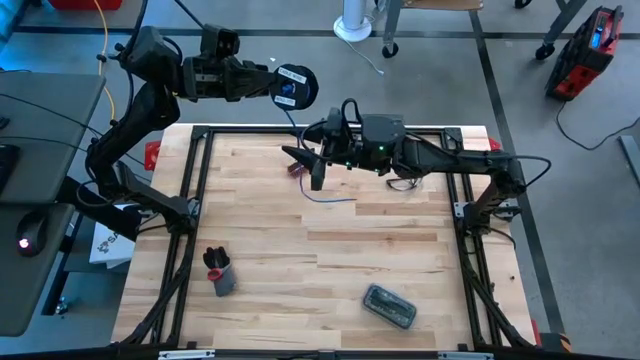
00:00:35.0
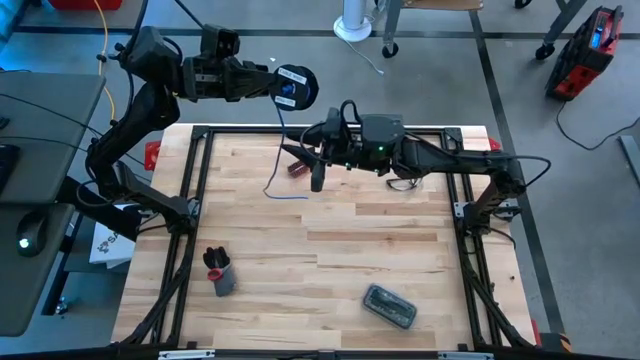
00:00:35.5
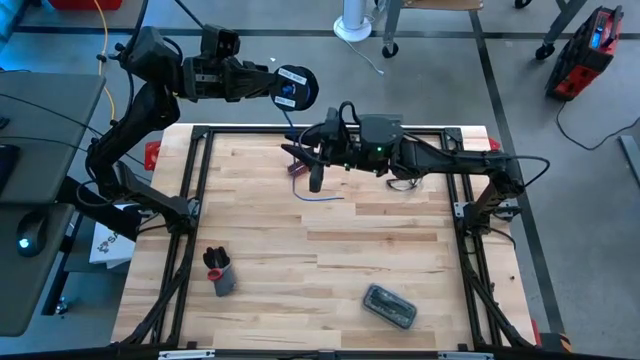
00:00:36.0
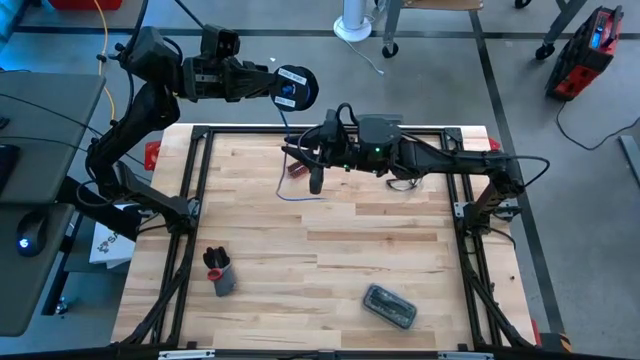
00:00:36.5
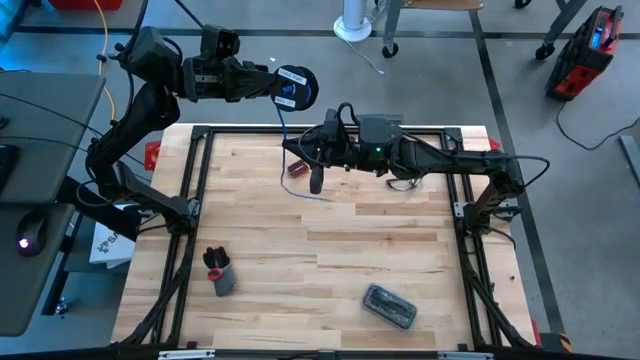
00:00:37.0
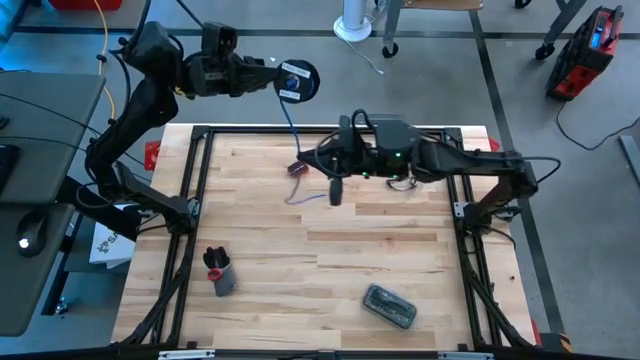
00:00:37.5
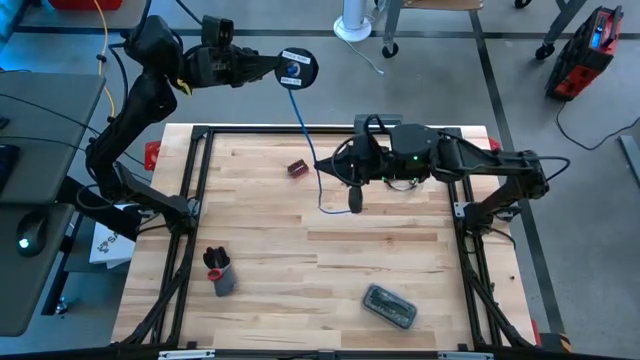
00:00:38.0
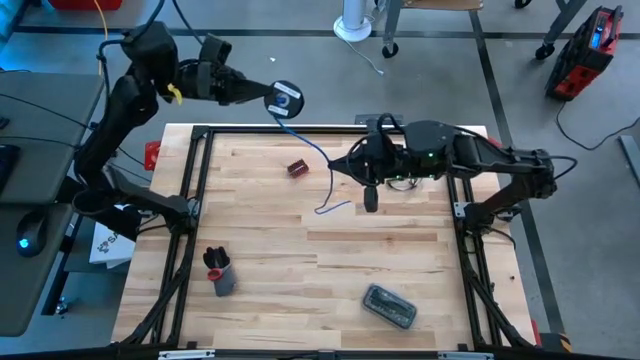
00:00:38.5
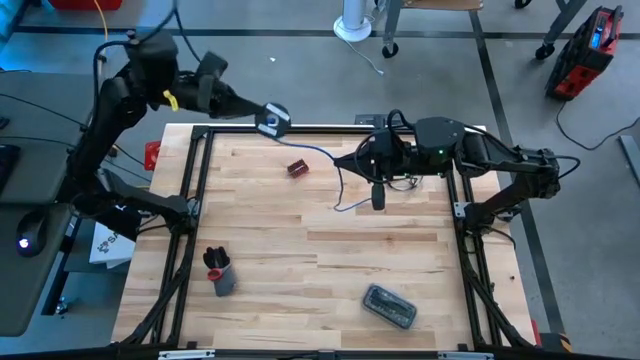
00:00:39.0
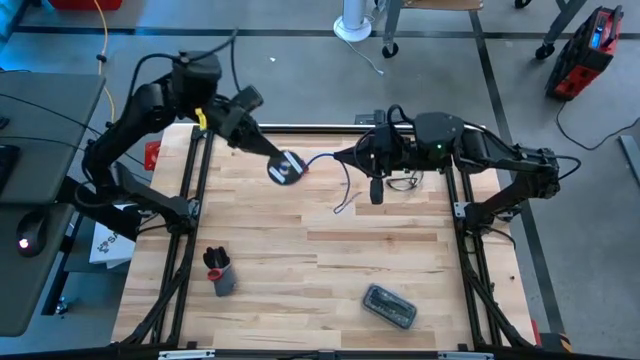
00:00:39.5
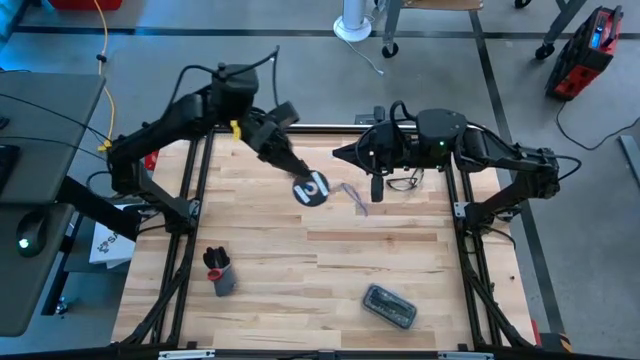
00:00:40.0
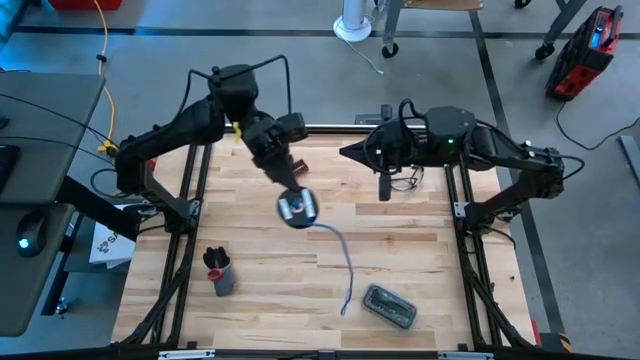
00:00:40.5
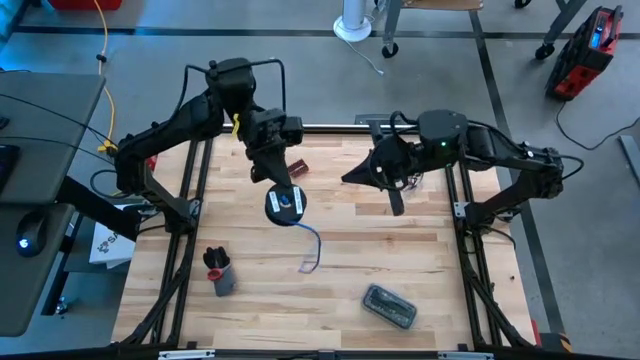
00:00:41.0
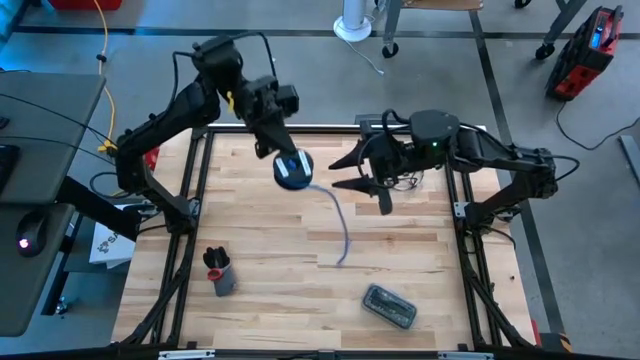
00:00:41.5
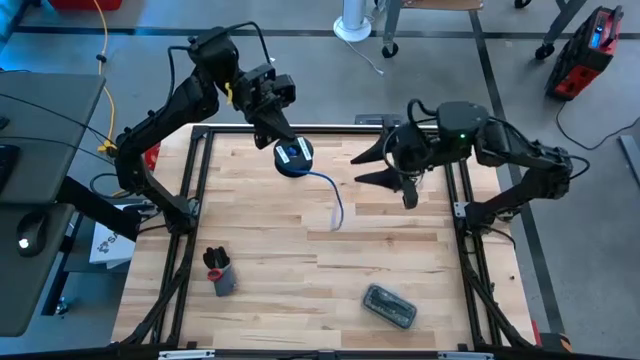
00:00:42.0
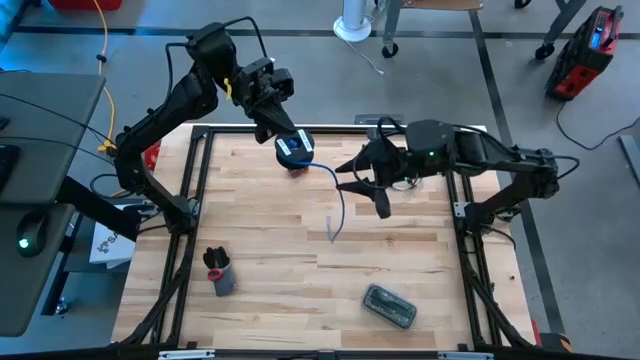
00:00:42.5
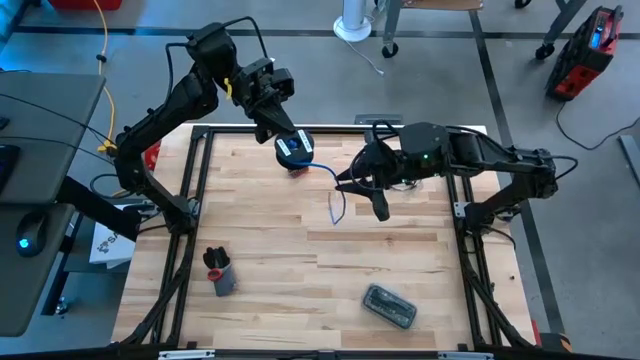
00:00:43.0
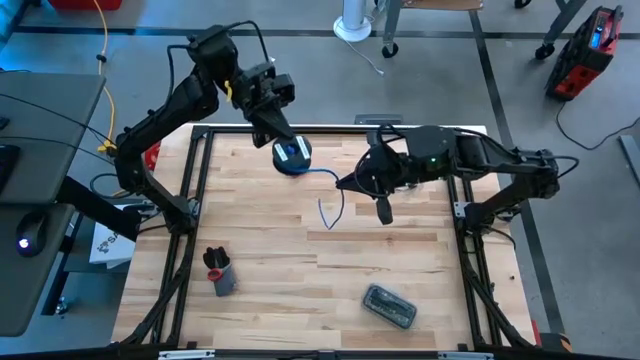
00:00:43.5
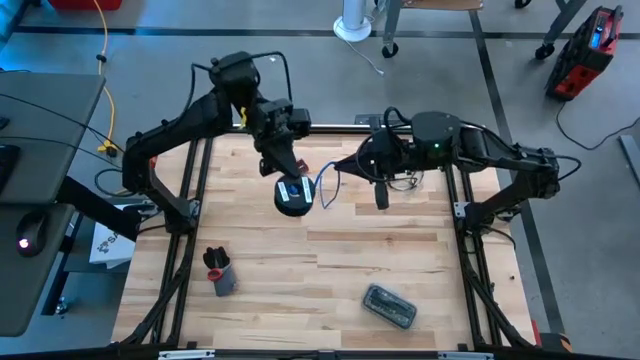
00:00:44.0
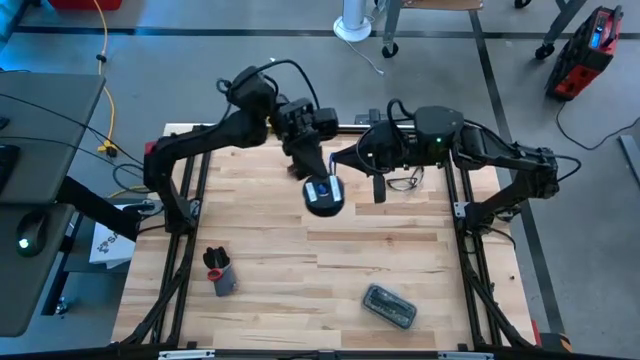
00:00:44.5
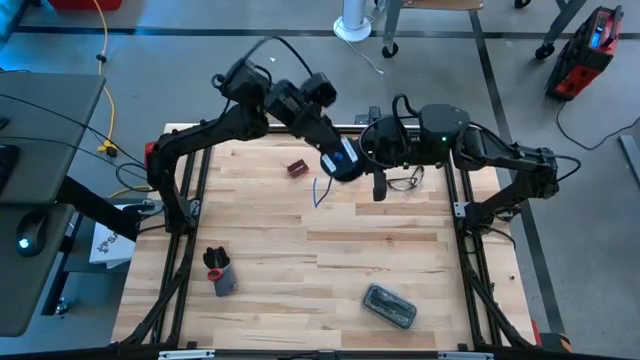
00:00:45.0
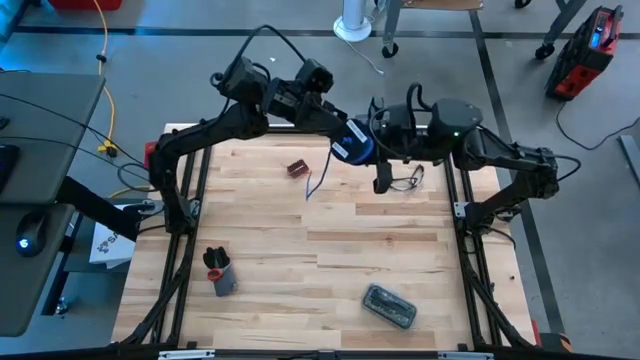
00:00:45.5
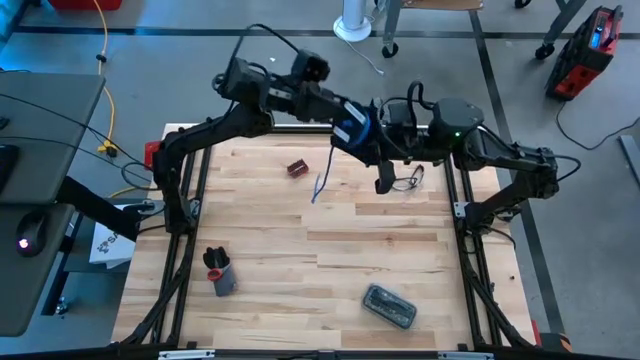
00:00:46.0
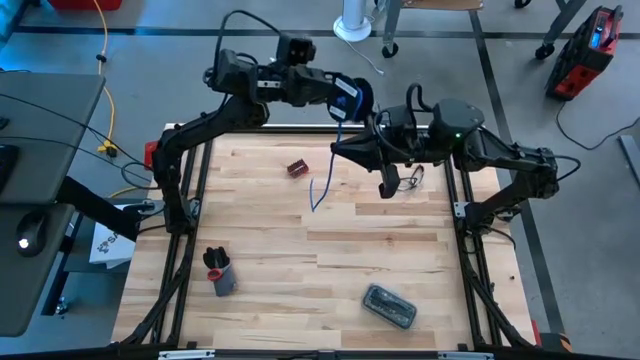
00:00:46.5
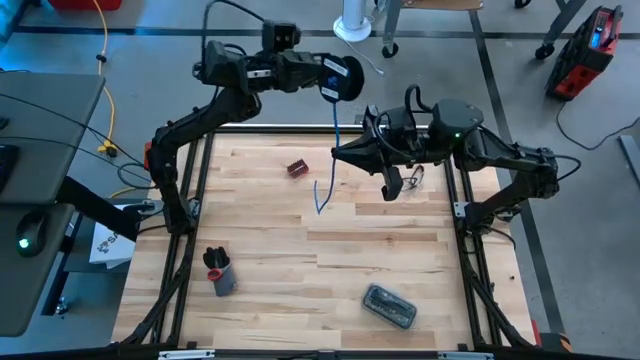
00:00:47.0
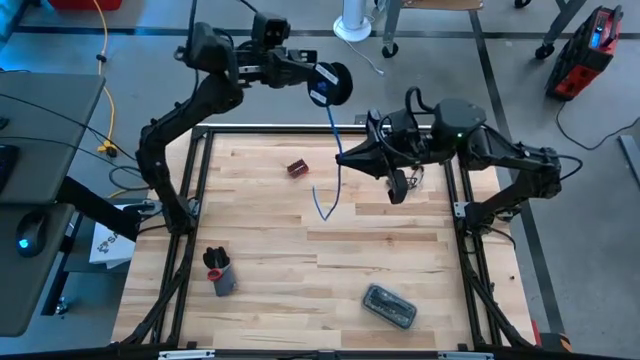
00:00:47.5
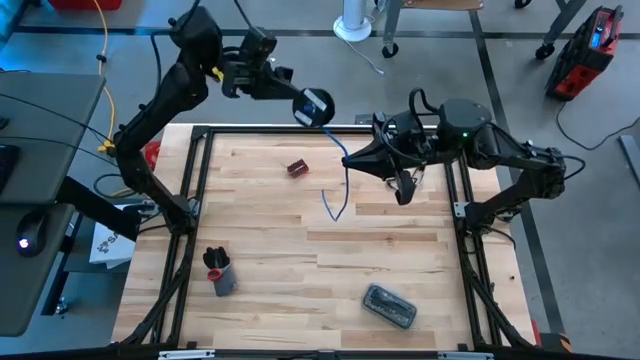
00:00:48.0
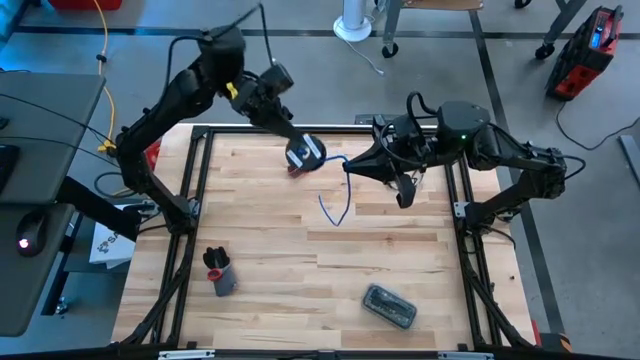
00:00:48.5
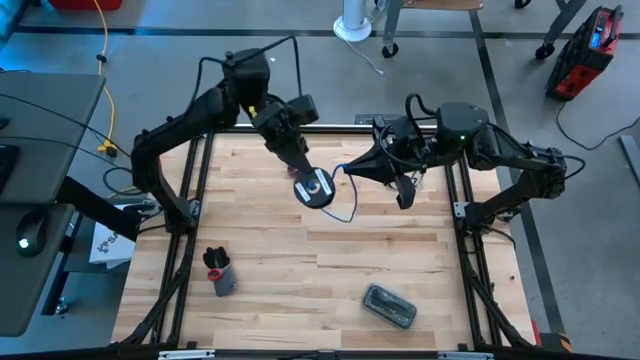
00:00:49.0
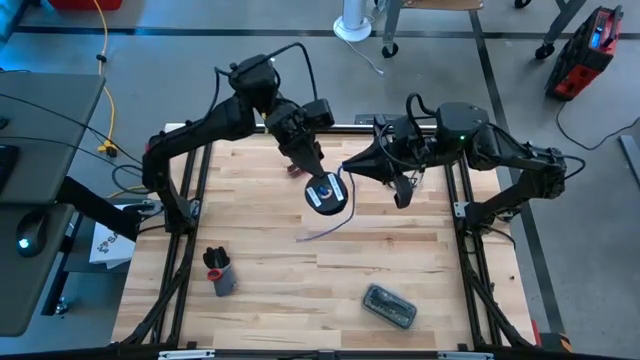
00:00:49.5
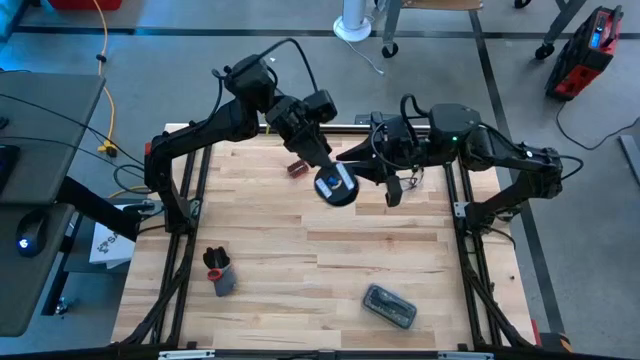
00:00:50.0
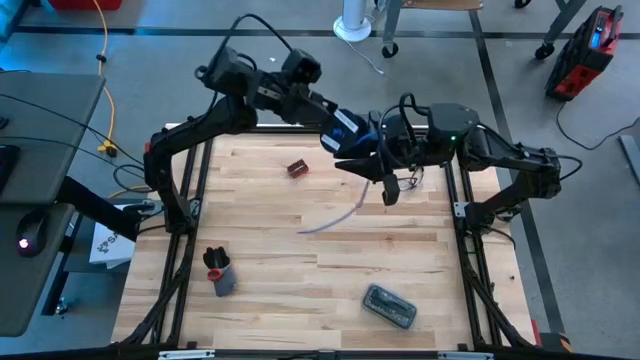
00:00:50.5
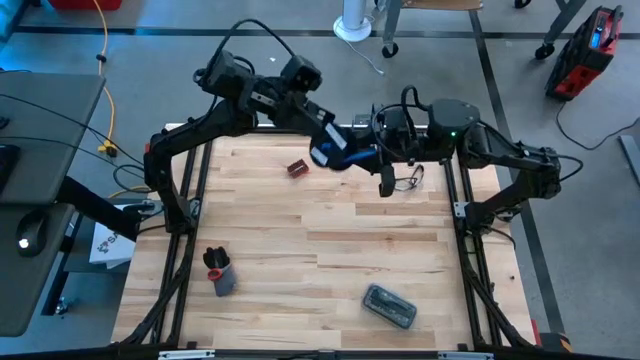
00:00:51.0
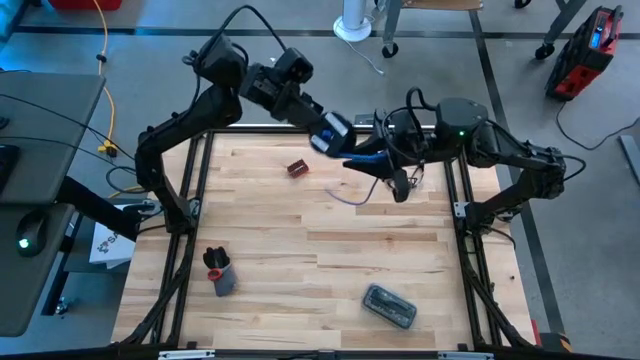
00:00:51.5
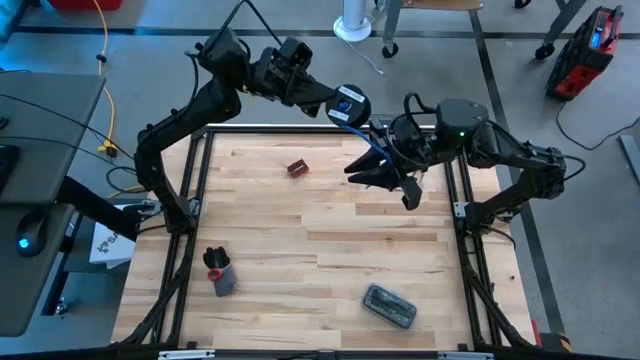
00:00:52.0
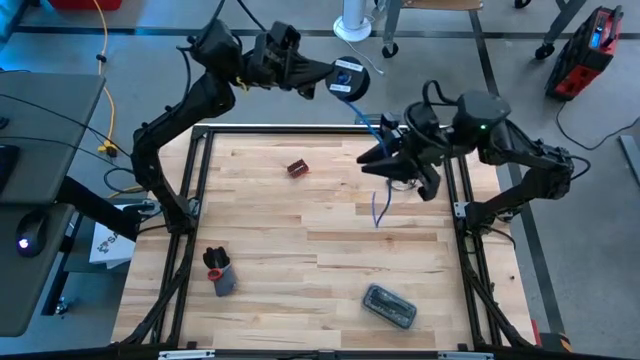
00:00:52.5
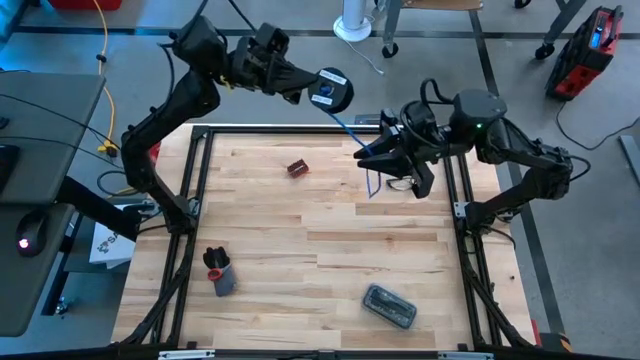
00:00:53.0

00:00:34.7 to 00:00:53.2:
Task: Coil cords
Coil the blue wire onto the spool
